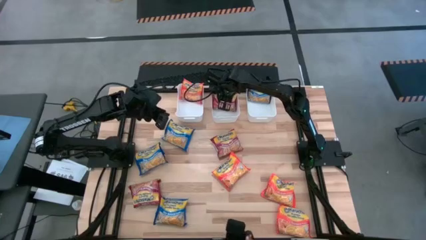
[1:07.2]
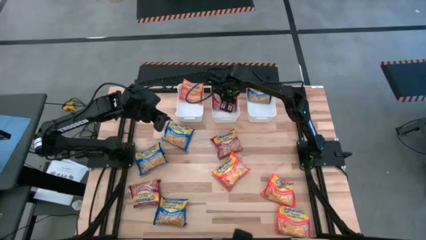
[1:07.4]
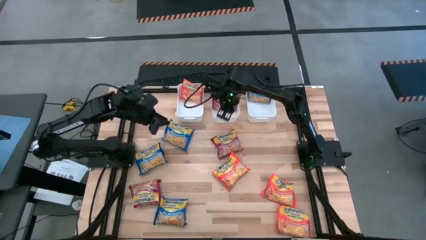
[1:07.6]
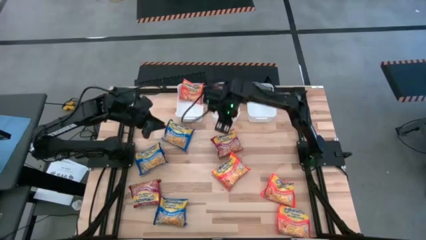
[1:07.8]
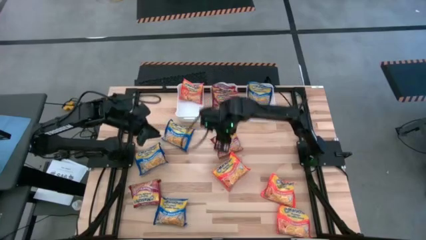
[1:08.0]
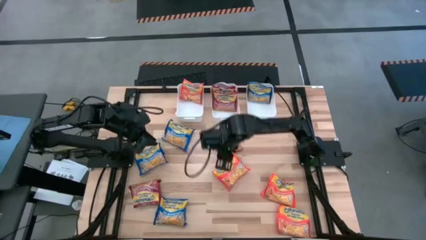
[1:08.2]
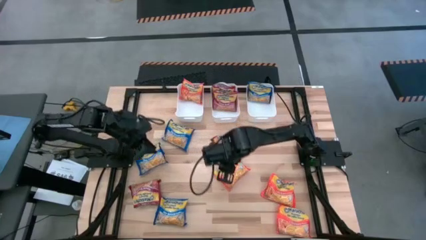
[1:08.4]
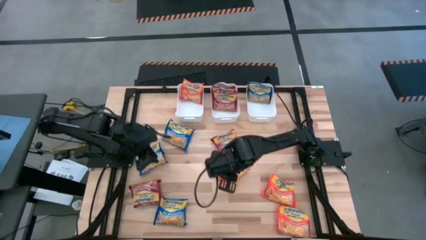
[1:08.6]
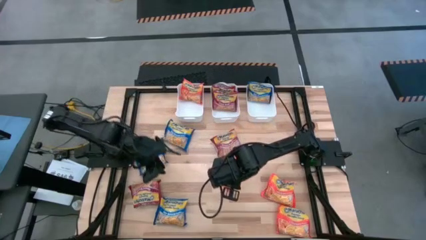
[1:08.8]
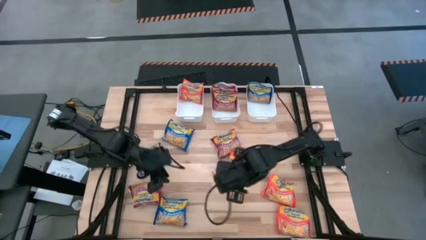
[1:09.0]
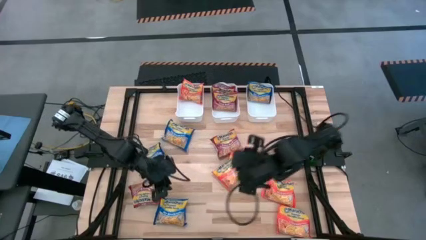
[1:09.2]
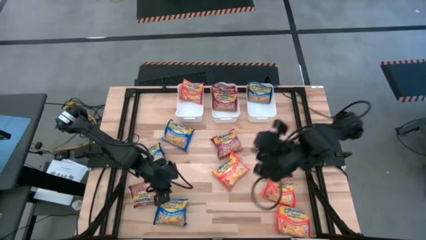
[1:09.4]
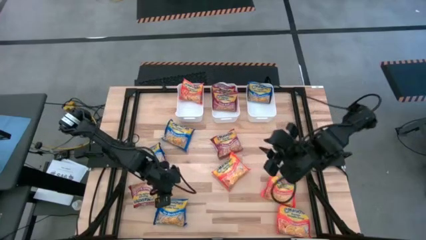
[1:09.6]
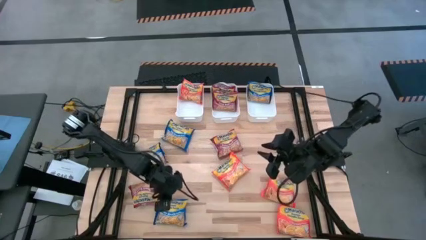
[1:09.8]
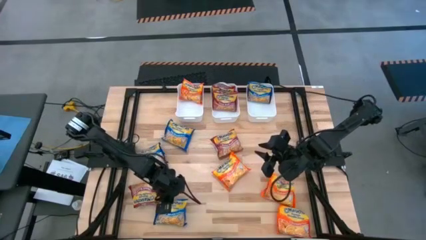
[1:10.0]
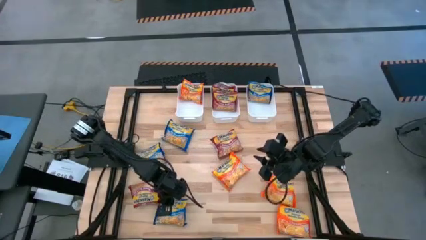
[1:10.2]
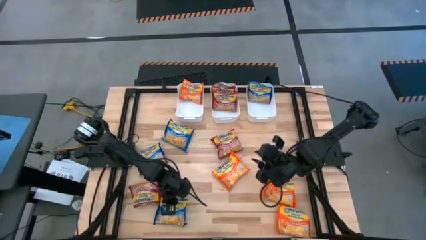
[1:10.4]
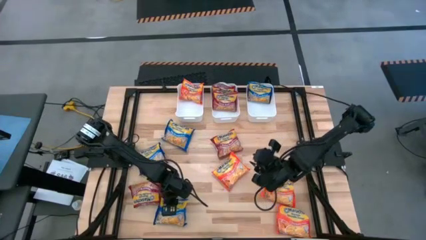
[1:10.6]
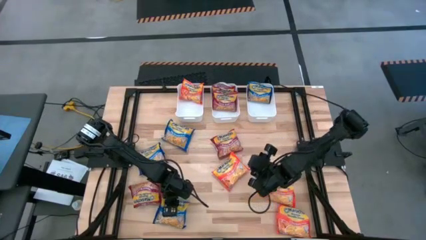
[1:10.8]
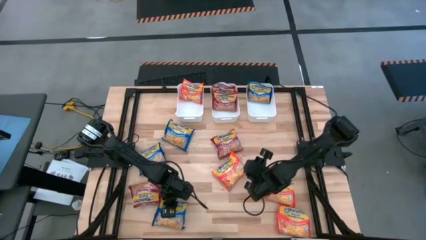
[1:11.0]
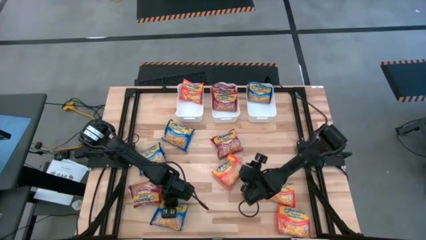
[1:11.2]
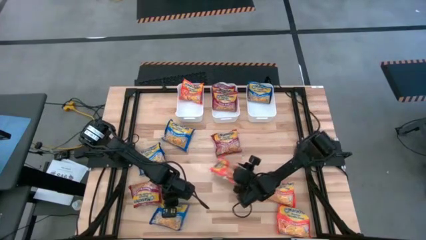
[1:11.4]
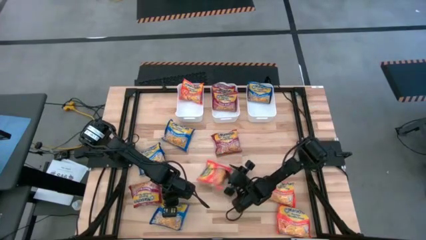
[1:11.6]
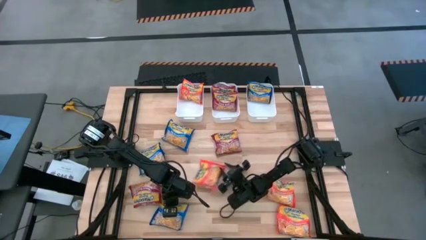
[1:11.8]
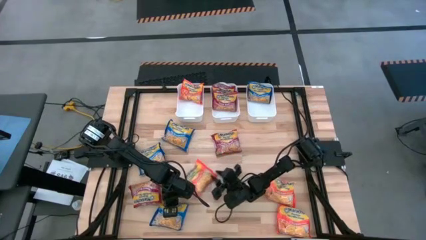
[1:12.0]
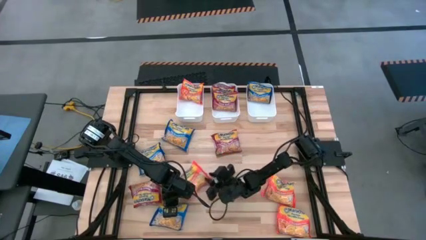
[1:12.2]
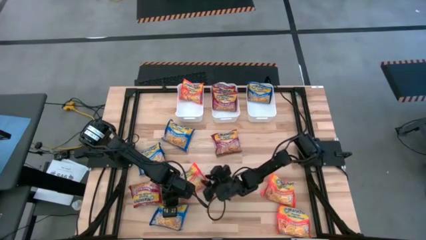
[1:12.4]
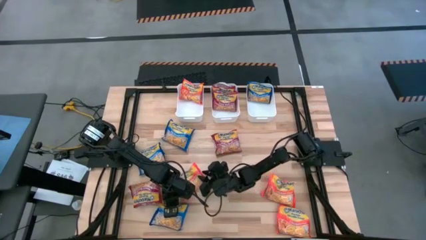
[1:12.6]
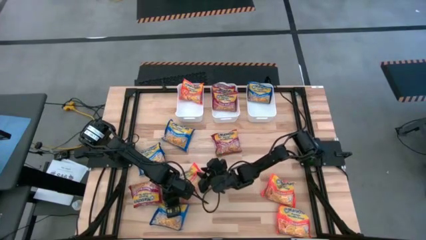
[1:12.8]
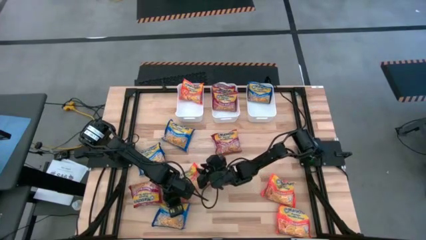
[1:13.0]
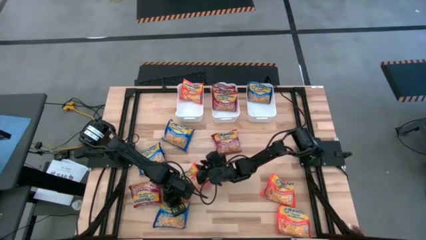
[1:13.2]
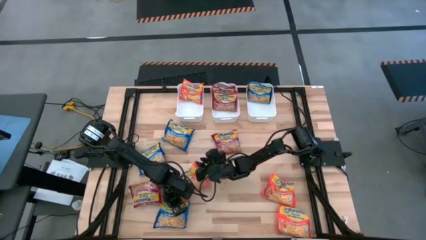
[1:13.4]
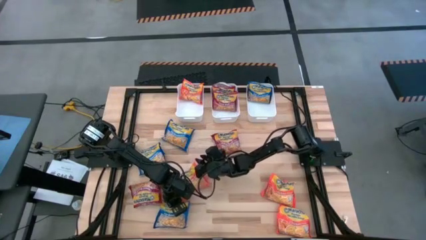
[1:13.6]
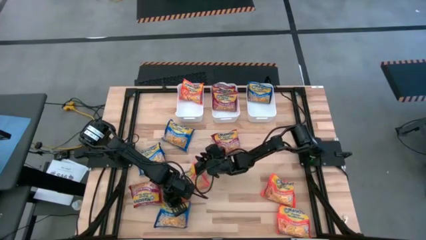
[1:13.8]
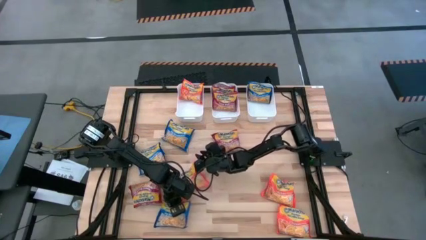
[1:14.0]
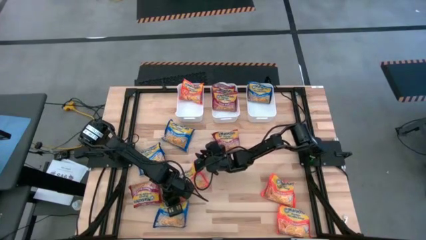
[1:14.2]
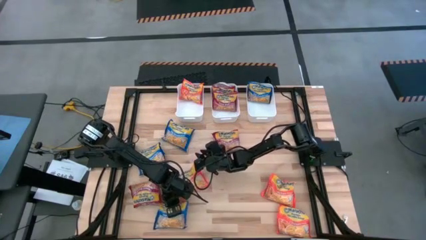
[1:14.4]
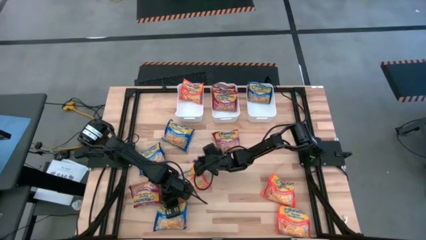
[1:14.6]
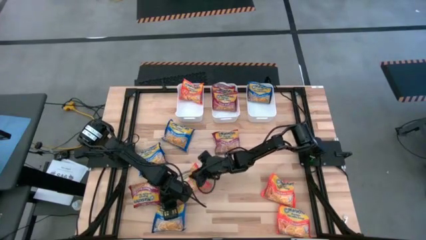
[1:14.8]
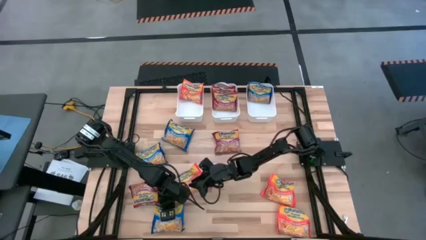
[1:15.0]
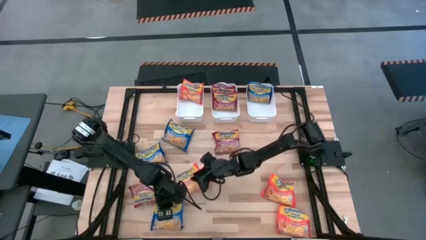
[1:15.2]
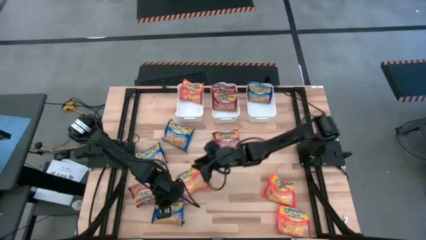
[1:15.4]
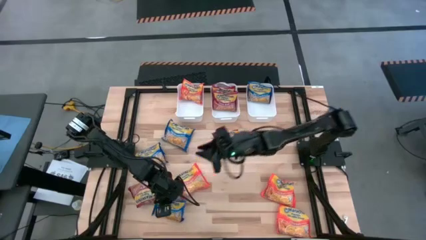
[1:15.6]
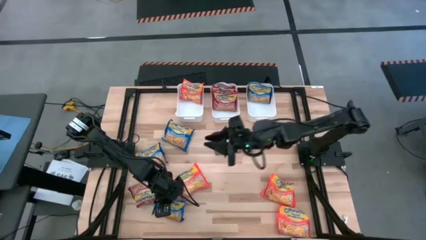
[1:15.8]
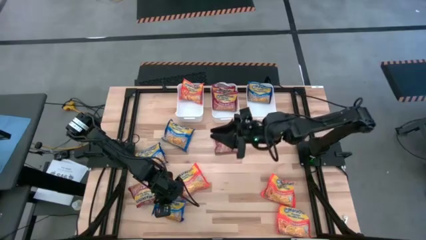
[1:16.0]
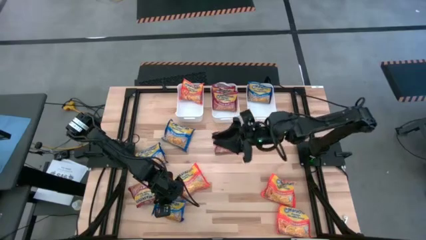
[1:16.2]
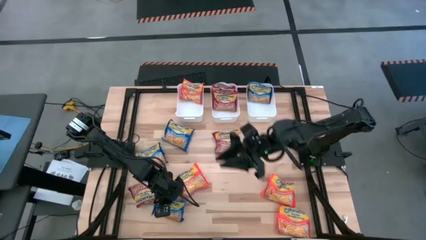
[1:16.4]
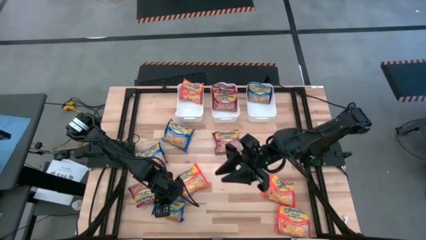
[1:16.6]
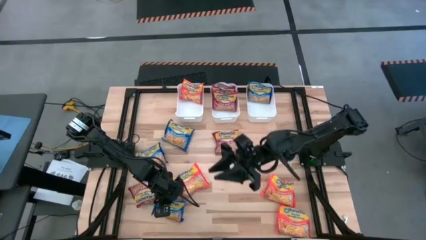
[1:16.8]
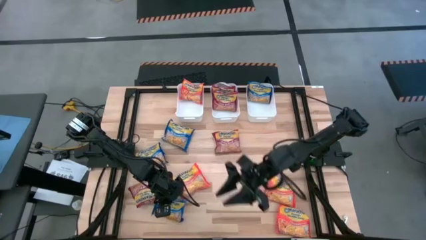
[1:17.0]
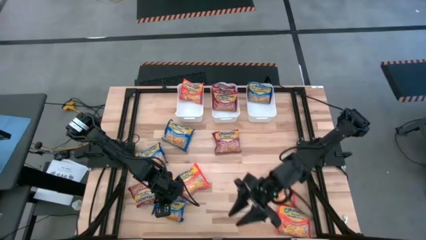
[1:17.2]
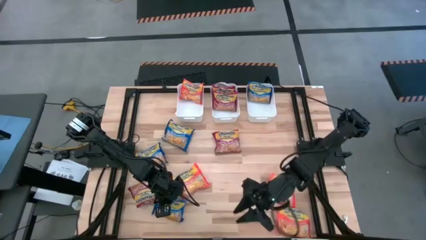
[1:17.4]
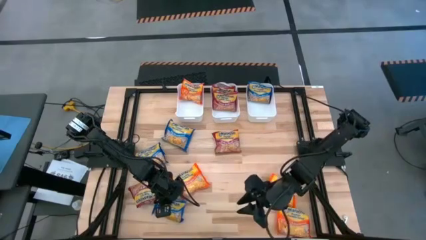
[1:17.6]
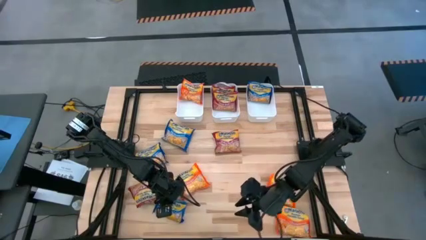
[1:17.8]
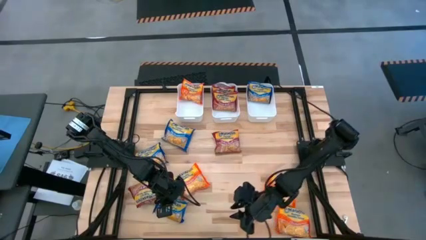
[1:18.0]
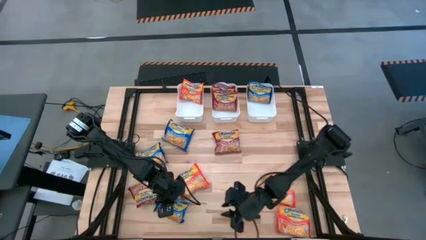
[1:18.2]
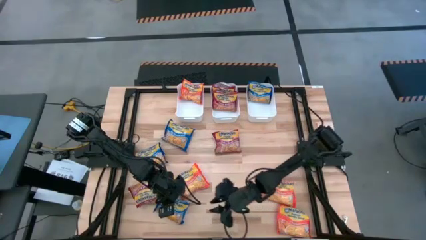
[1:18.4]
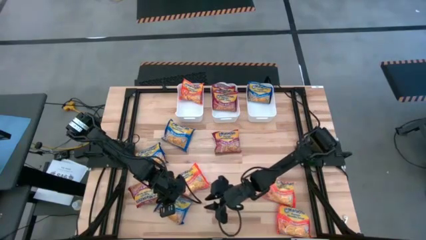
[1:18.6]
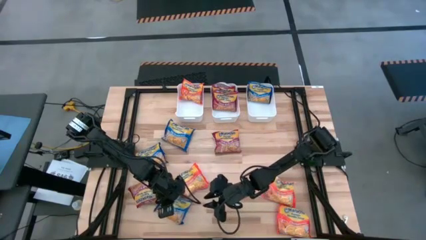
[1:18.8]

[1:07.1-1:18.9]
Task: Sort Maruchan noodles
Put the blue noodle pack into the right white bin

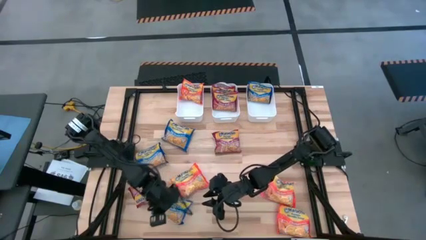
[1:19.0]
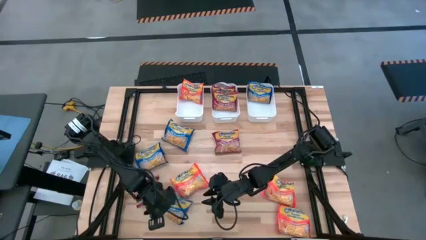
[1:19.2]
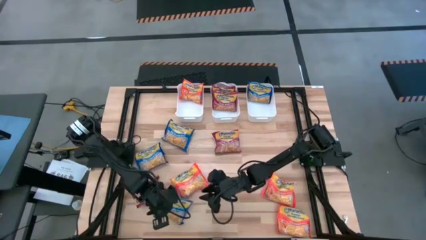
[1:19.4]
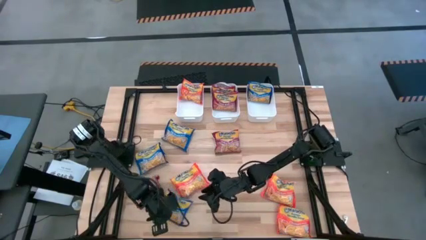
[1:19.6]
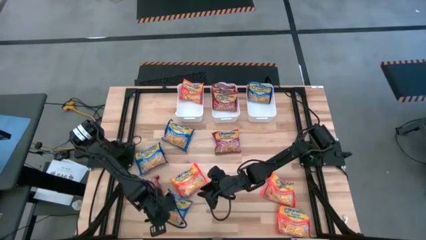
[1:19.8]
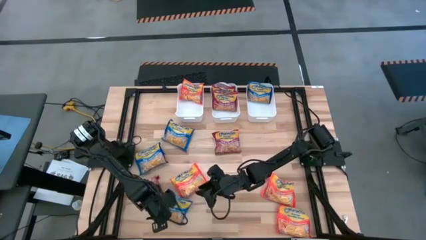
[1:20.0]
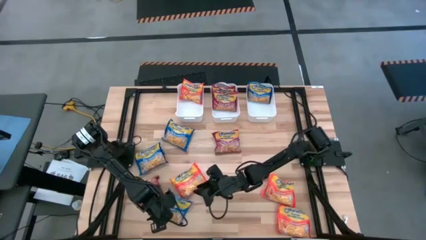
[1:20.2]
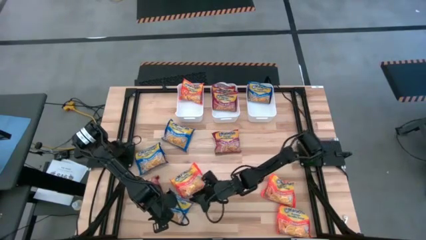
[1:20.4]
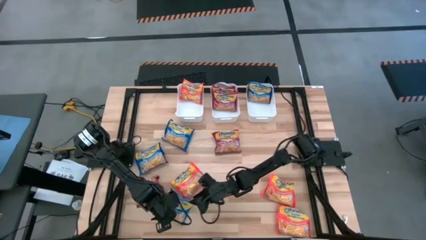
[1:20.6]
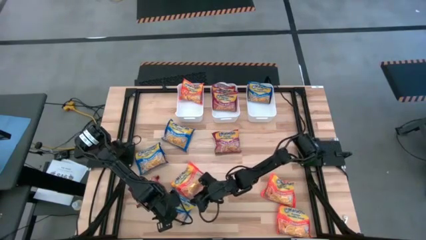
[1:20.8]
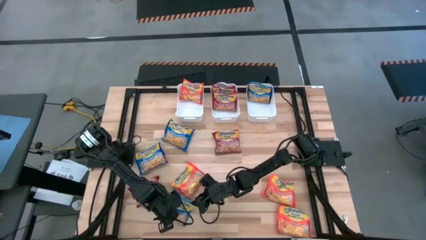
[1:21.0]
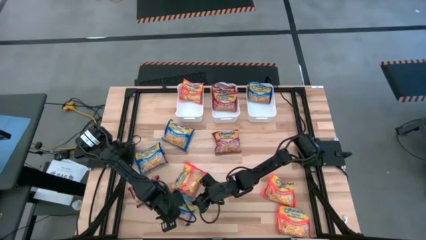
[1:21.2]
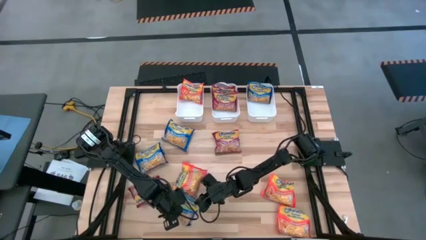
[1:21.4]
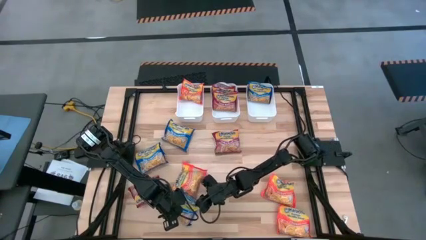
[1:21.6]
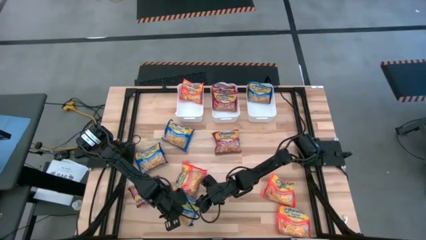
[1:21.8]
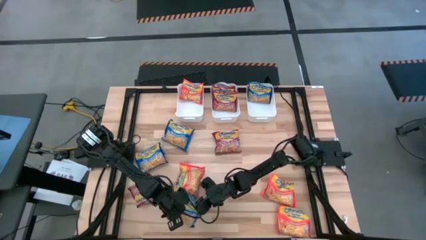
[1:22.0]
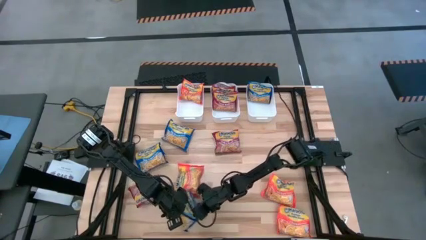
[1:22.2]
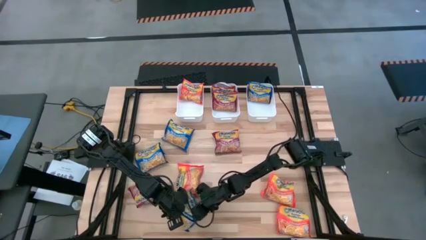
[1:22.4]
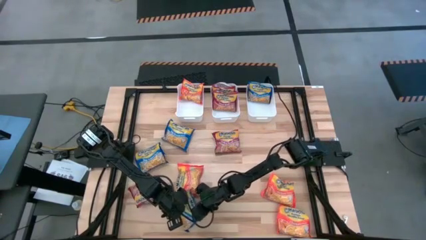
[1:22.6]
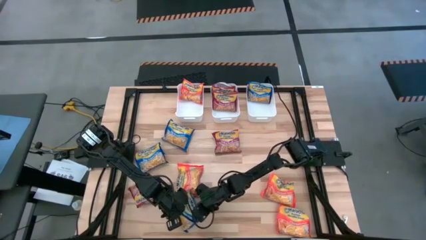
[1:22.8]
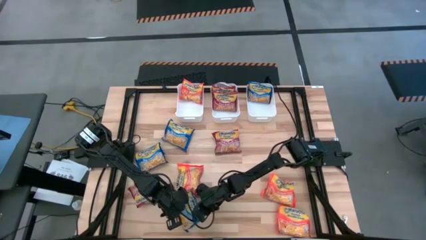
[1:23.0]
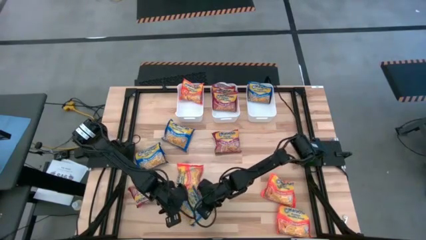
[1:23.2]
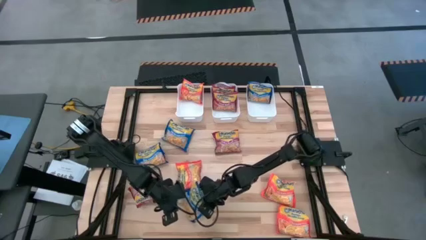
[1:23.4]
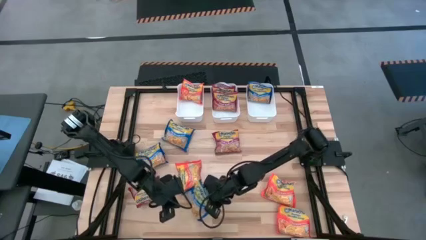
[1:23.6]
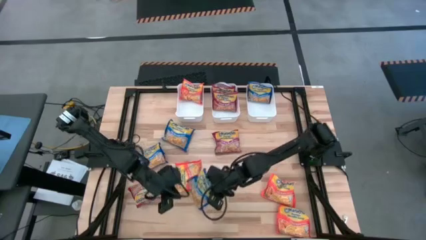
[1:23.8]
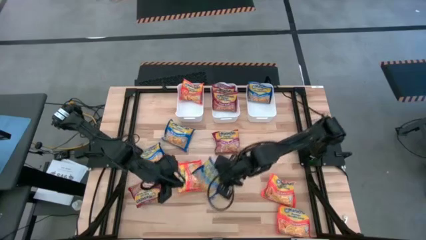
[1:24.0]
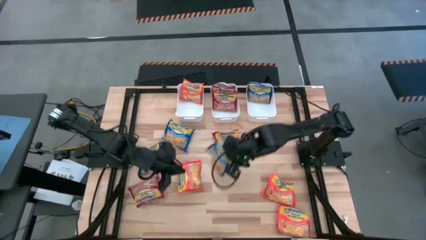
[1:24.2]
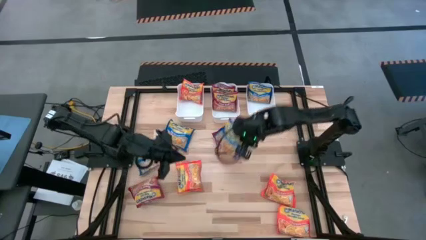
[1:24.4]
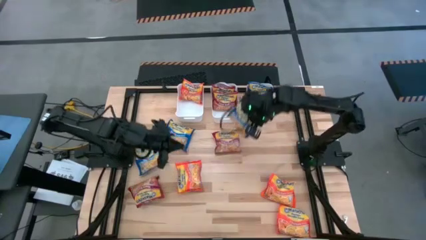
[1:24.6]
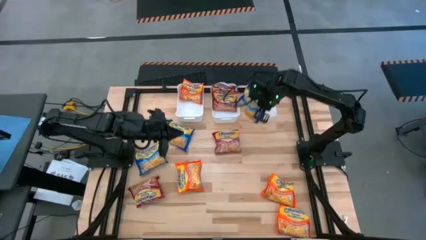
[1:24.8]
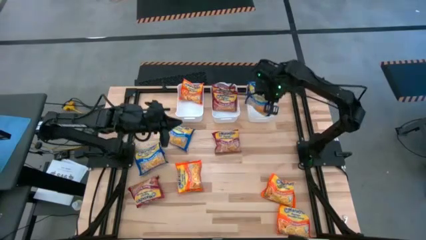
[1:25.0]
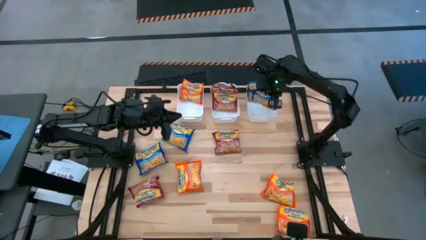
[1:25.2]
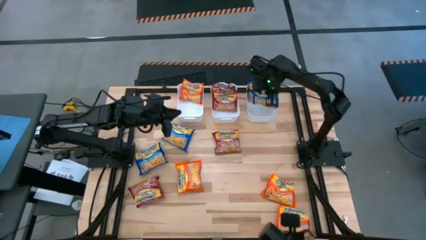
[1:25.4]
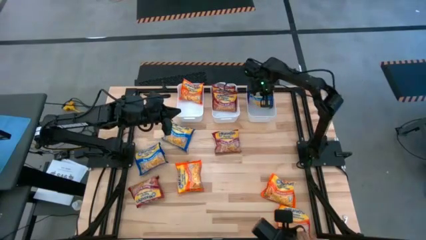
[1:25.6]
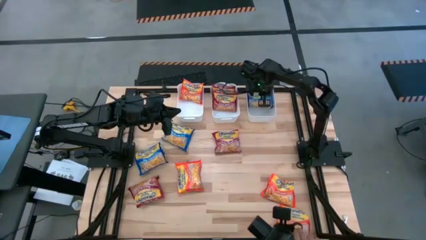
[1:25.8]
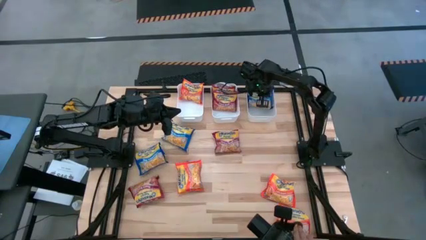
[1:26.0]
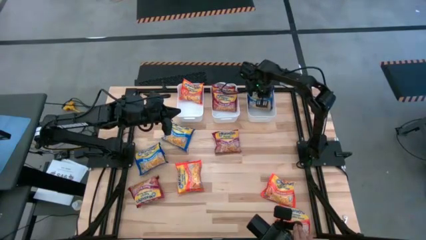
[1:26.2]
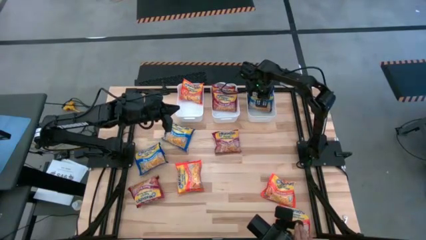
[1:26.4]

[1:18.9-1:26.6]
Put the blue noodle pack into the right white bin
